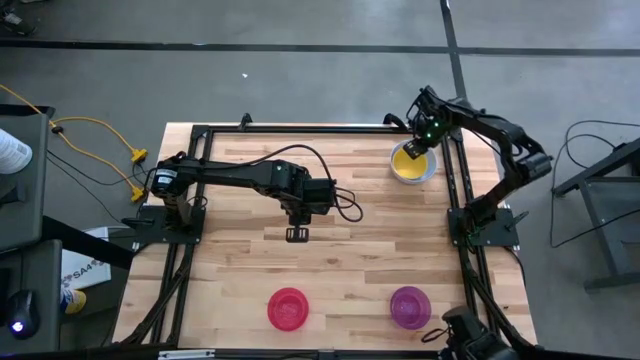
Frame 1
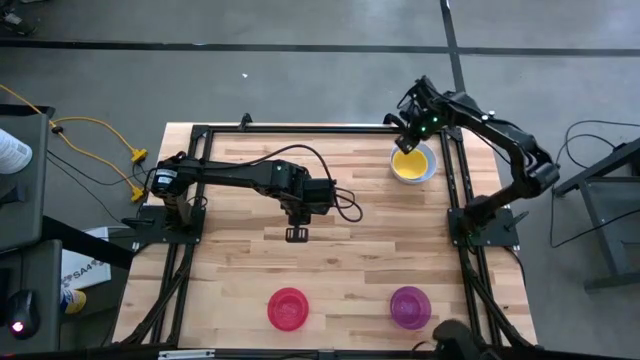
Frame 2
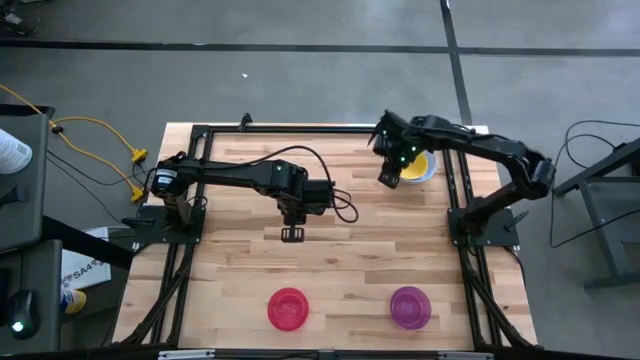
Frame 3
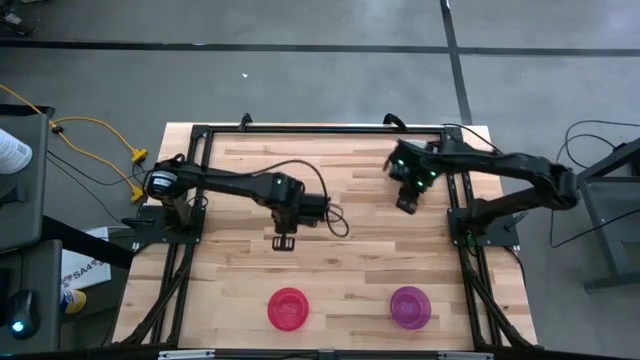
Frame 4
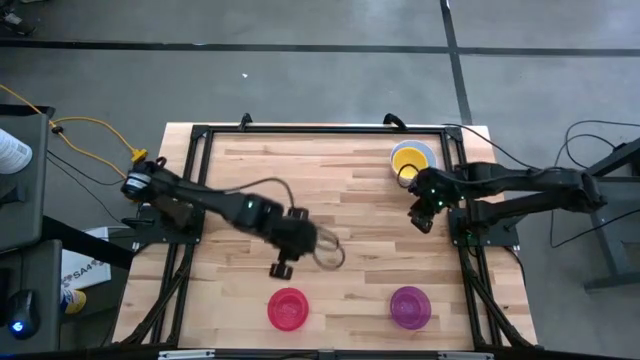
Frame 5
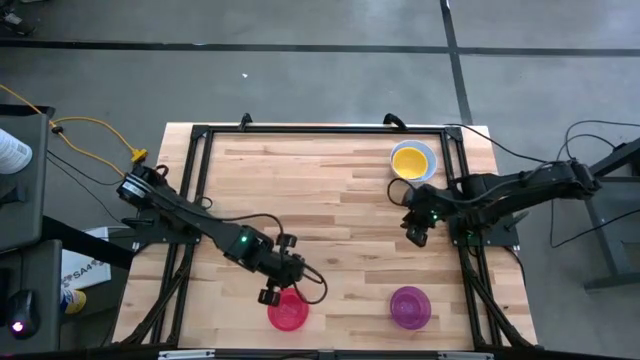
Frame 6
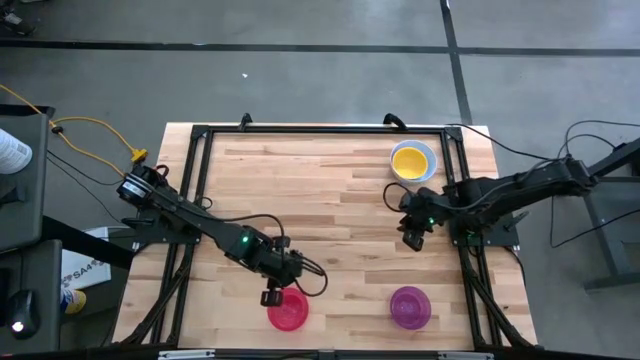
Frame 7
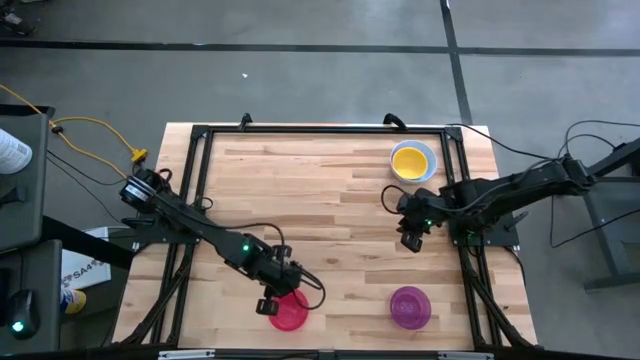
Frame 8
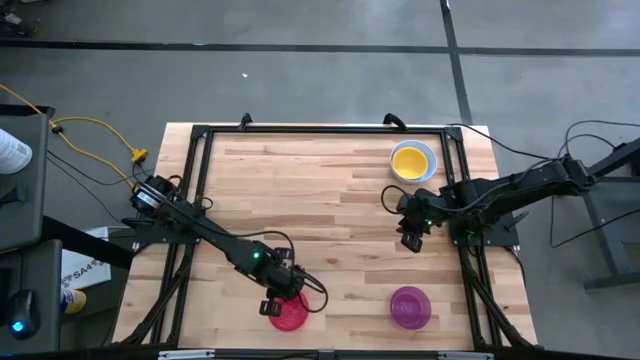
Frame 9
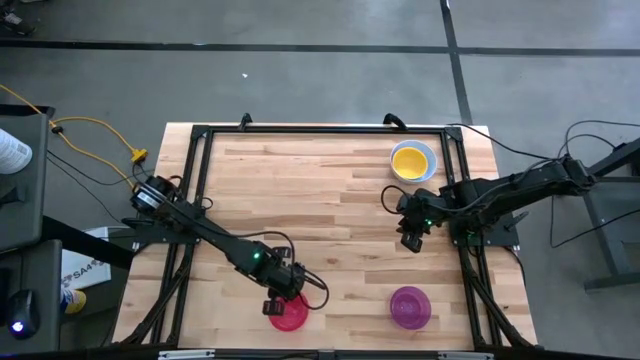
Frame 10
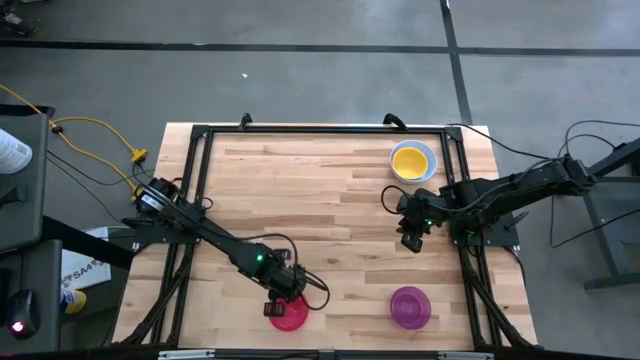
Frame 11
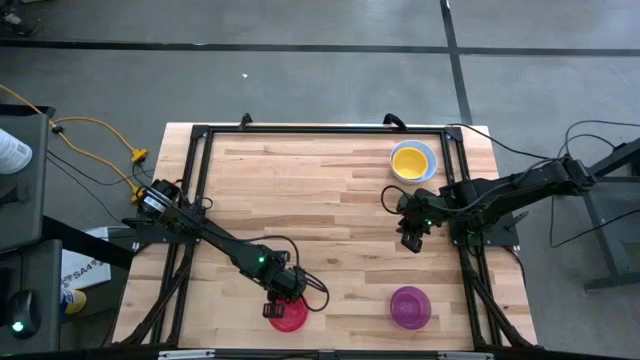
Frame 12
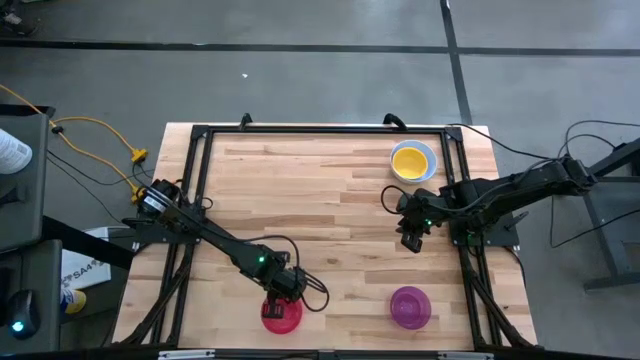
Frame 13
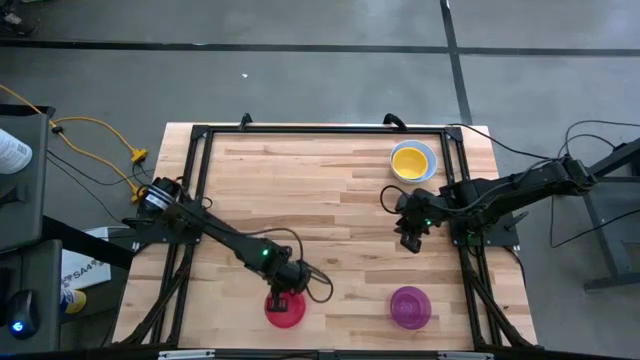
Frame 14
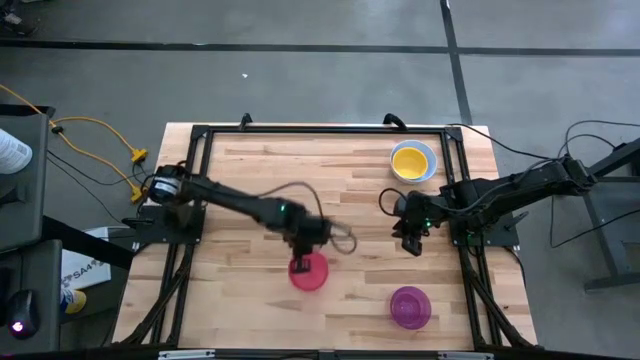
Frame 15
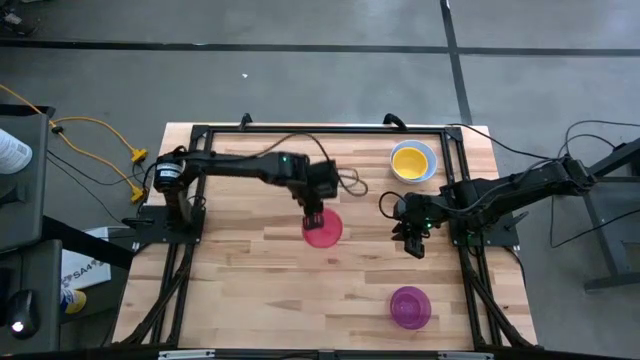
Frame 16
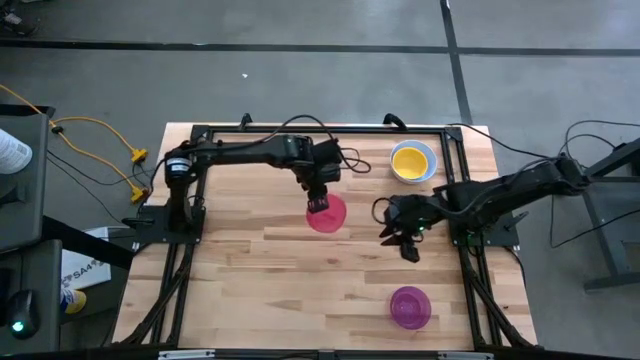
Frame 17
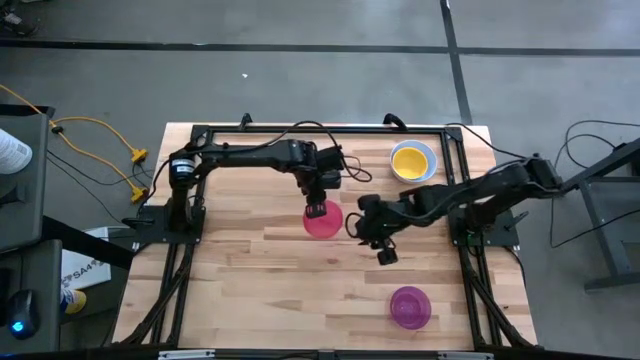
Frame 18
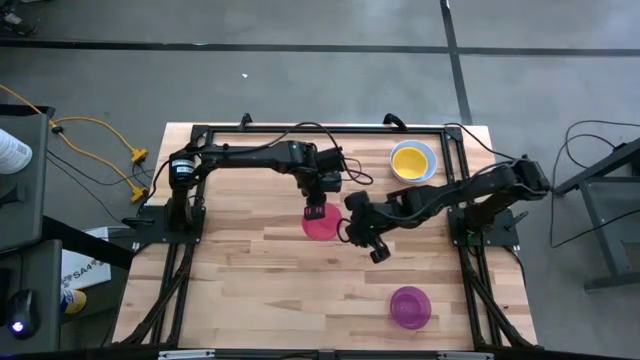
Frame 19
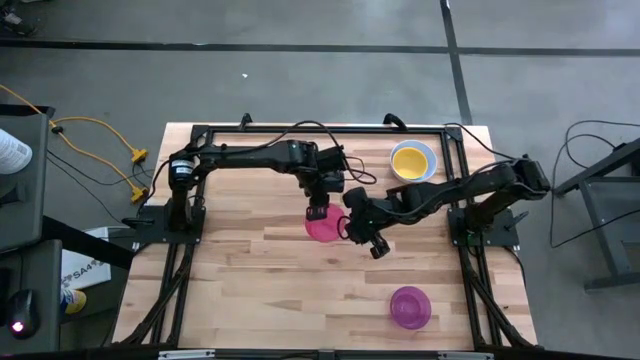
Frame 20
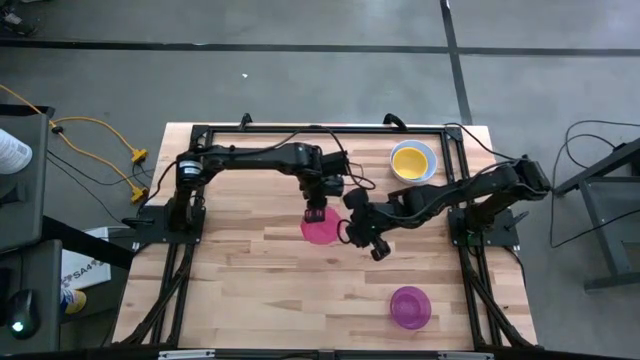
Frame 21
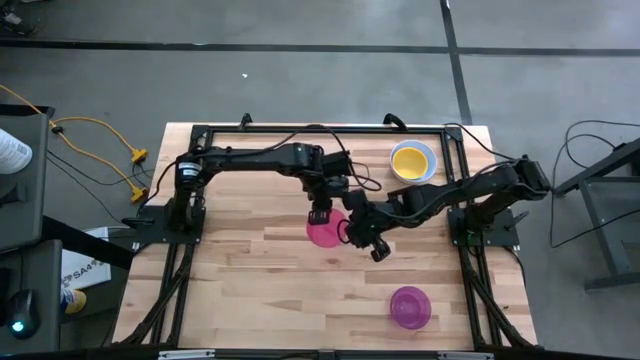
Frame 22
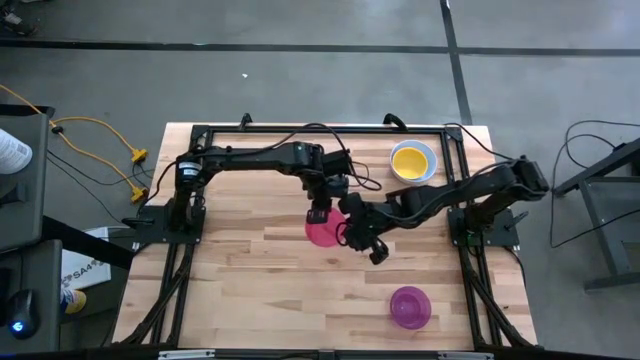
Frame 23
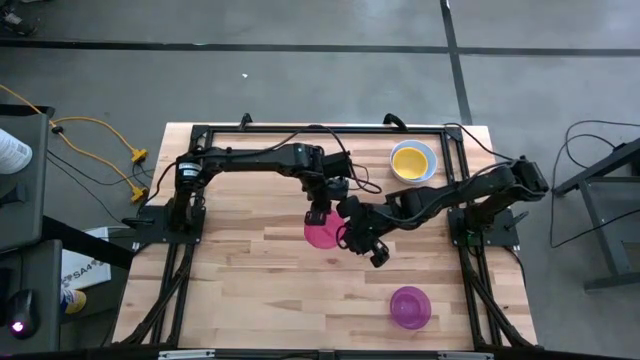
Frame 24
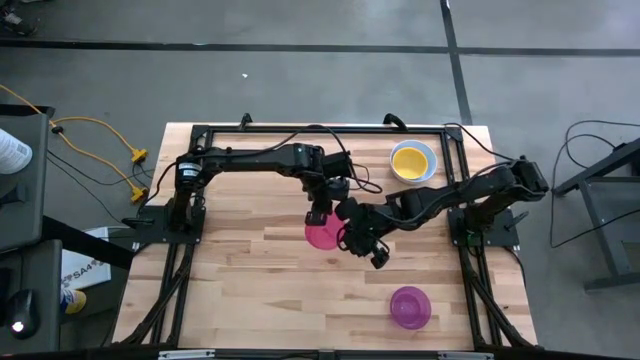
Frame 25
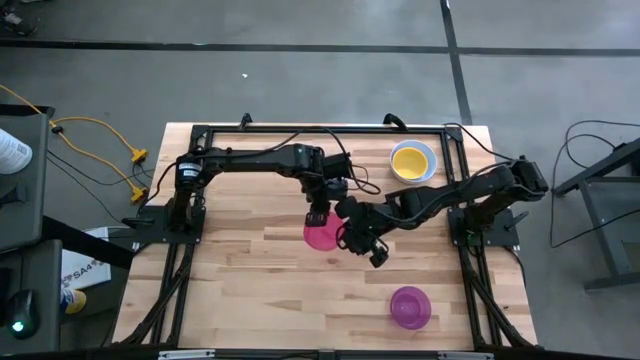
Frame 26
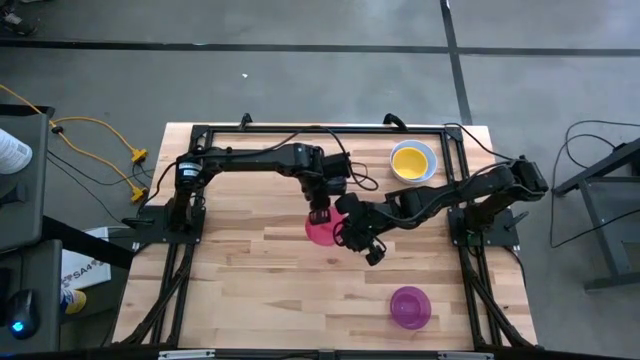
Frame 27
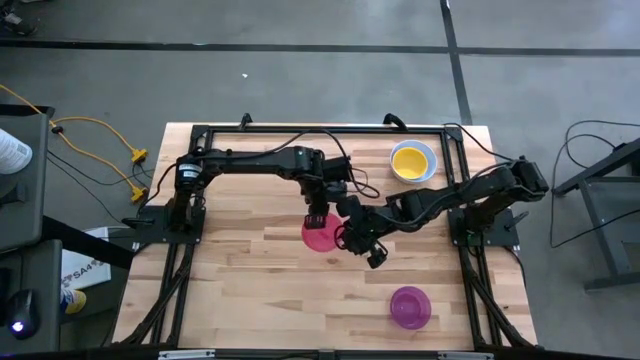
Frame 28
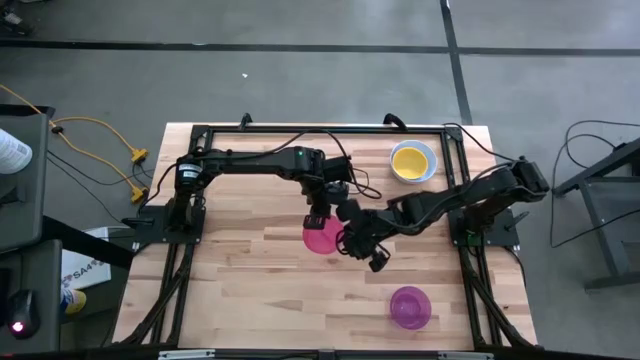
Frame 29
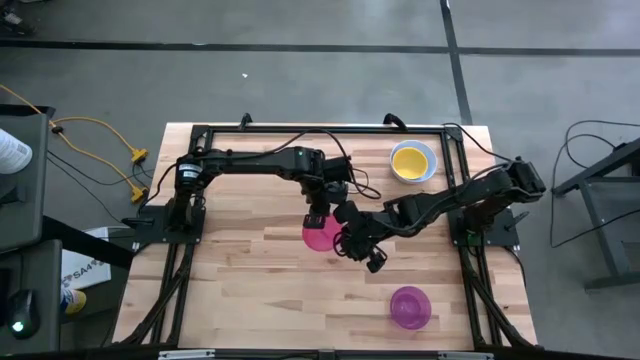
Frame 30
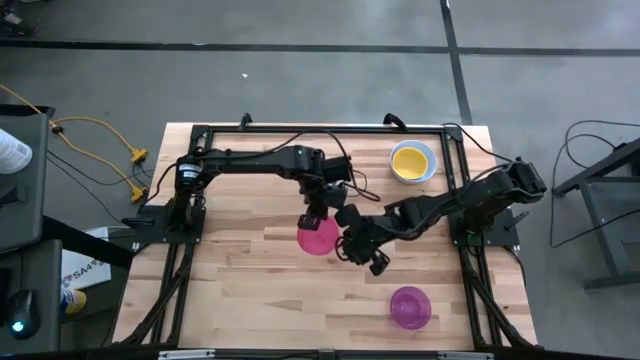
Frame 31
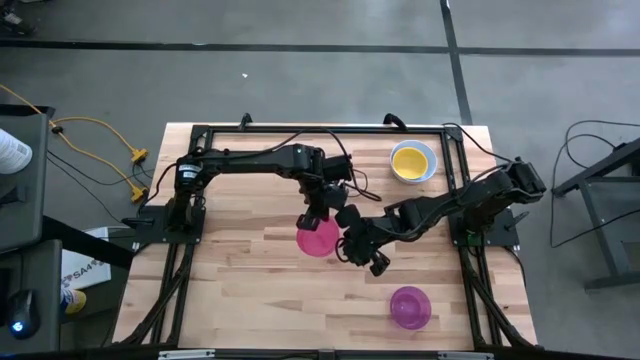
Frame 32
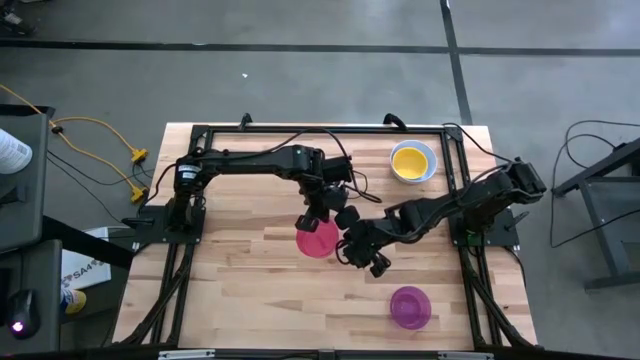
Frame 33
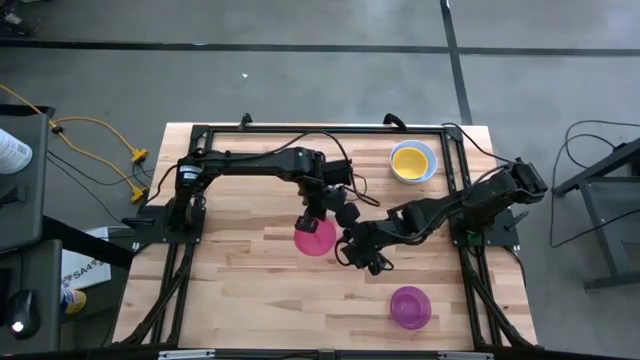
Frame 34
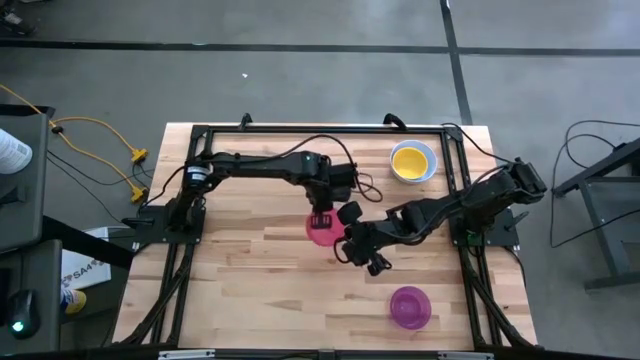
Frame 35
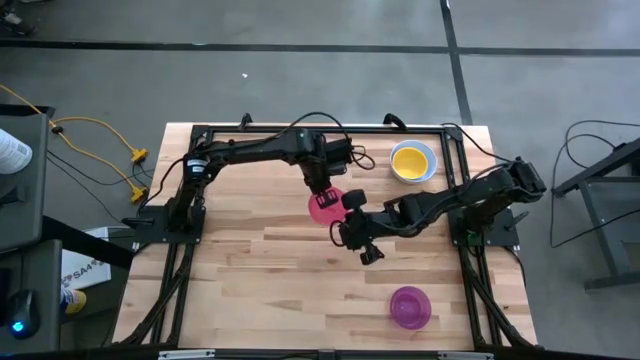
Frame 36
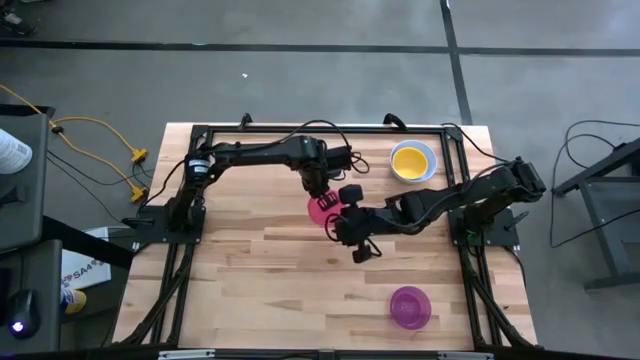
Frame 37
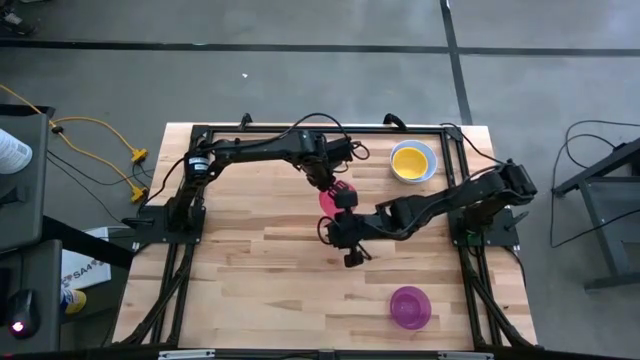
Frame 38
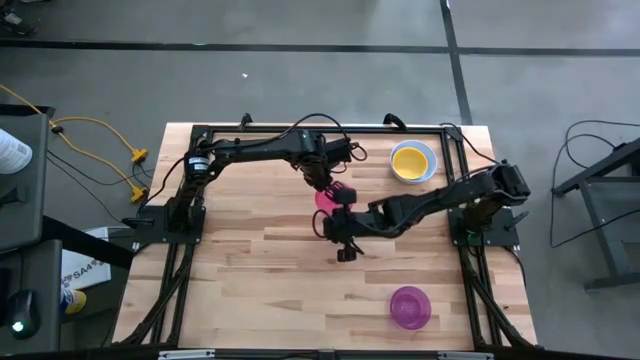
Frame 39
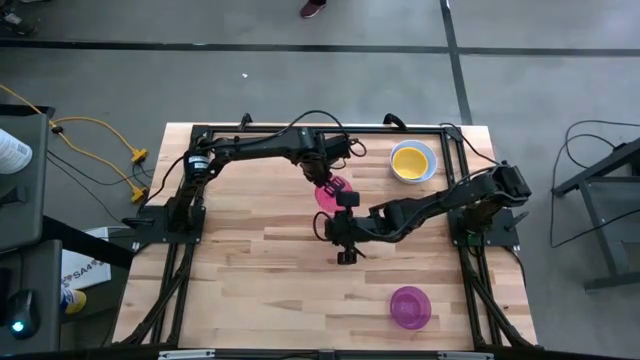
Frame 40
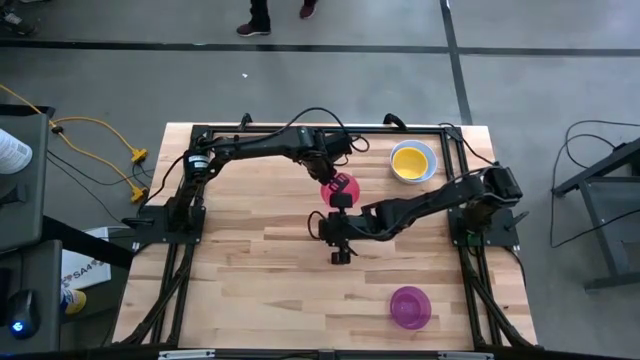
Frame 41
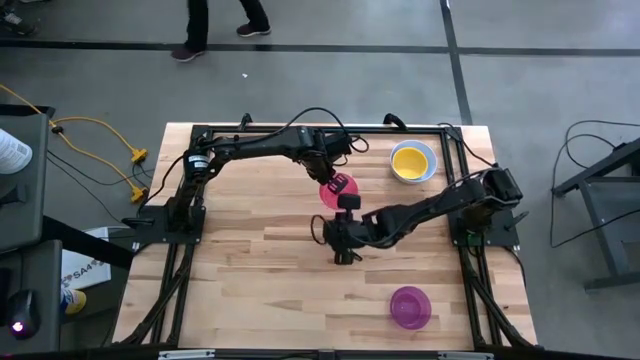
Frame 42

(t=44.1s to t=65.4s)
Stack the pink bowl on top of the yellow bowl
